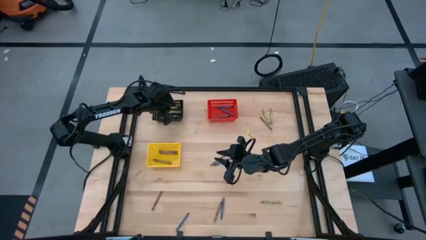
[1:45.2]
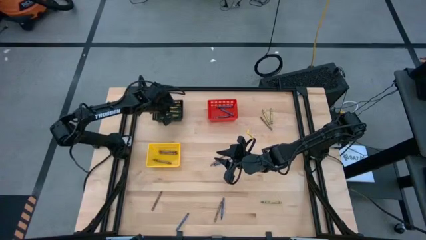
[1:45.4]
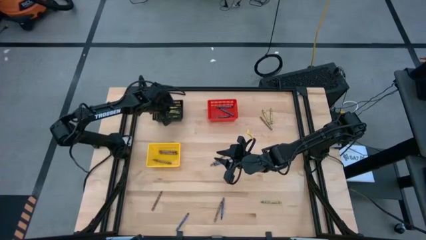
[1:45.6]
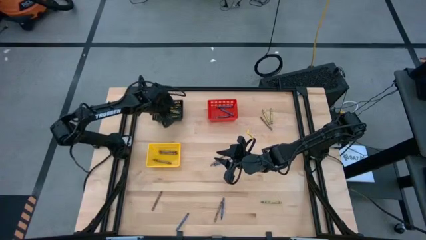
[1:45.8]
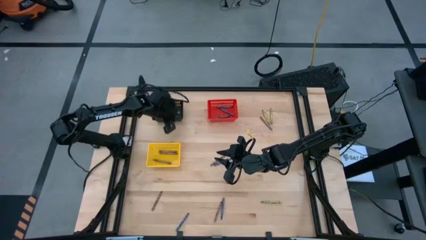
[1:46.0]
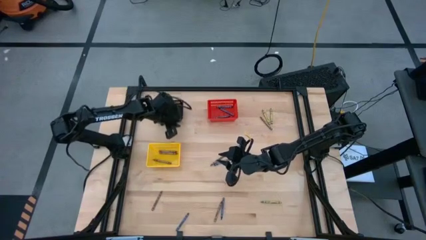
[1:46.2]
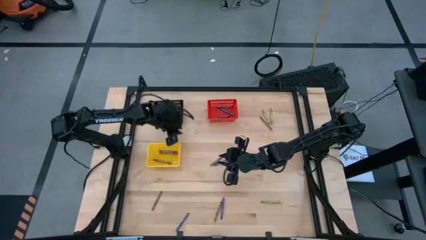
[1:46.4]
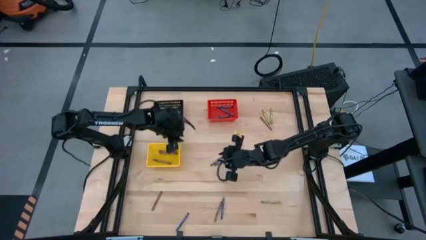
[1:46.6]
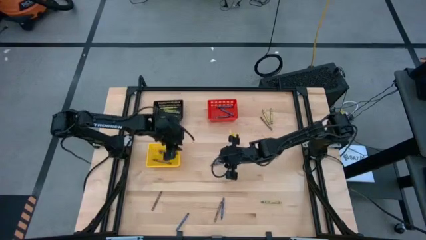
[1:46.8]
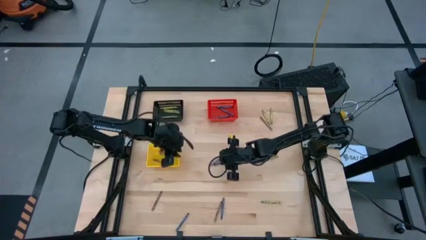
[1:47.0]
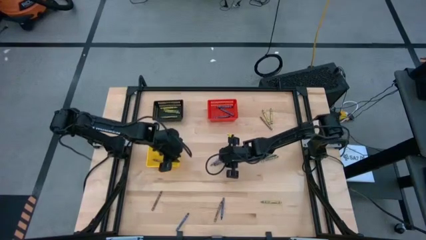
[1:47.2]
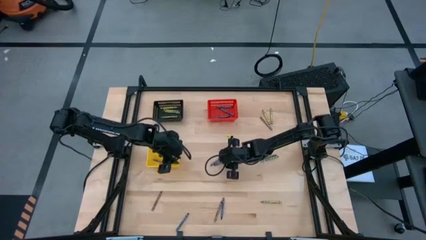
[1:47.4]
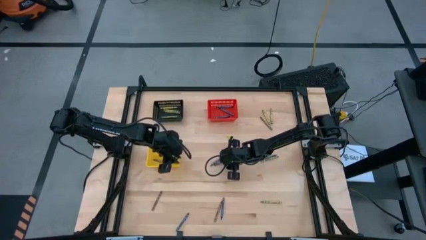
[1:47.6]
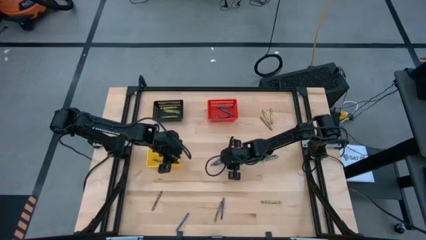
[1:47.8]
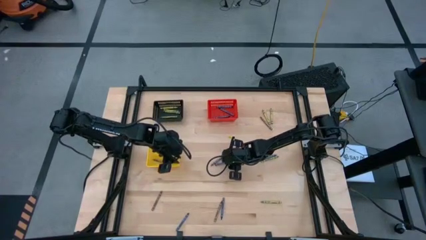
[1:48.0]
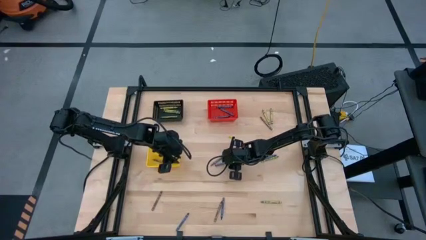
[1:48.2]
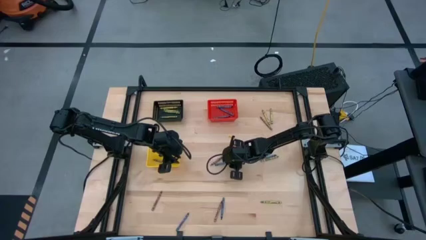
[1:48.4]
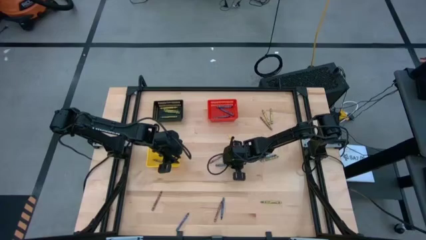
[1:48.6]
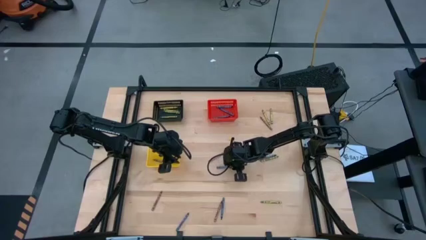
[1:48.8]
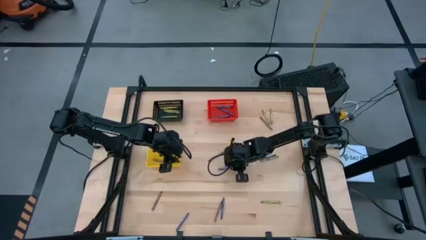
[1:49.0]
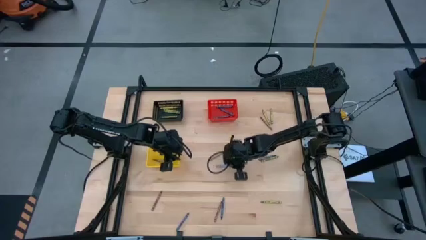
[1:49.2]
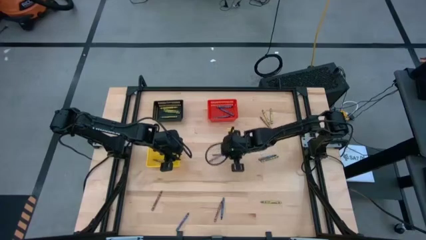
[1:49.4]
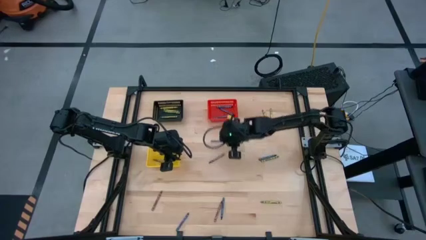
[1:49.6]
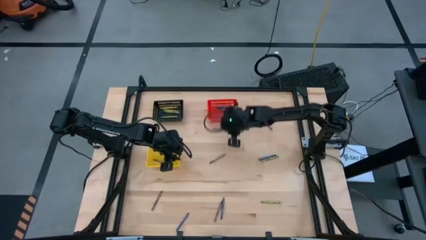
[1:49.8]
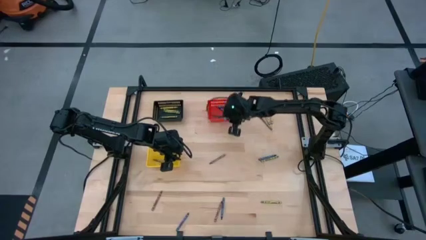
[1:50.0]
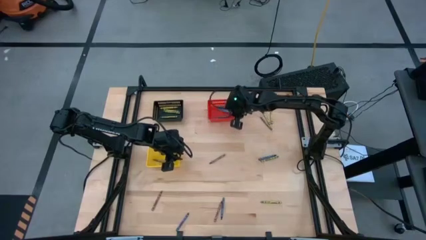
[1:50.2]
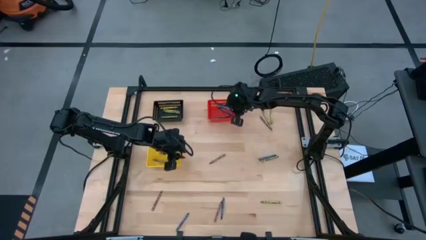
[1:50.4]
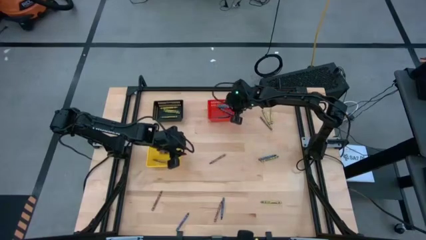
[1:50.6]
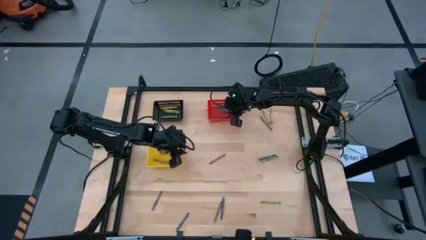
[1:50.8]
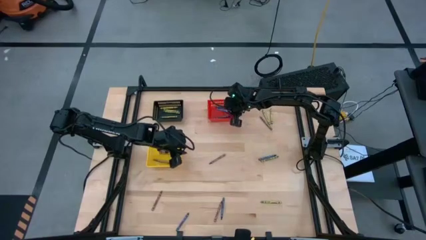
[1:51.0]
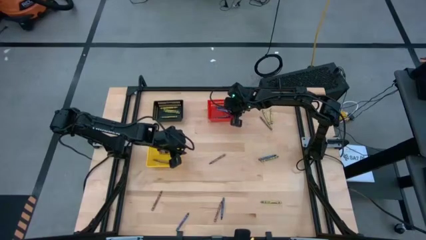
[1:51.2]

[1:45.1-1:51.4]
Task: Sort crayons
Put the blue crayon into the red basket

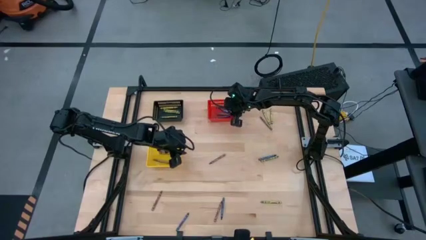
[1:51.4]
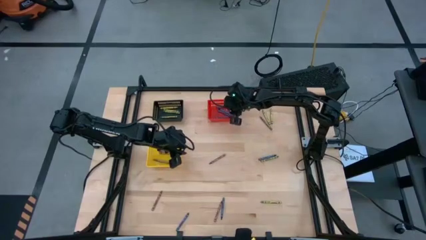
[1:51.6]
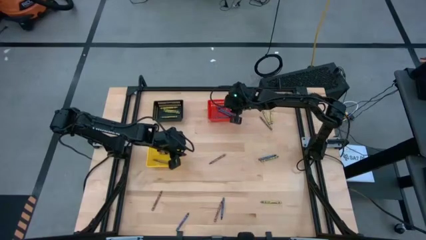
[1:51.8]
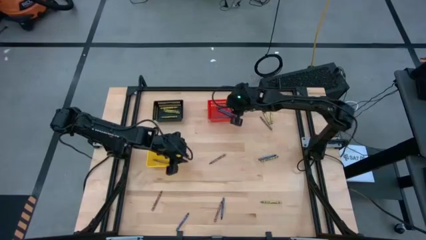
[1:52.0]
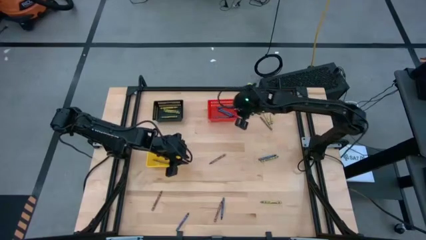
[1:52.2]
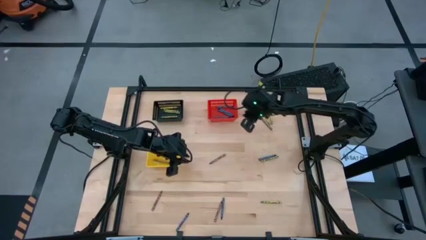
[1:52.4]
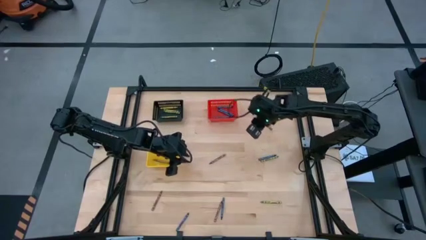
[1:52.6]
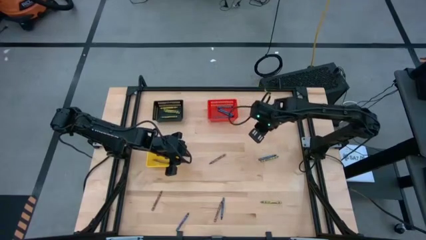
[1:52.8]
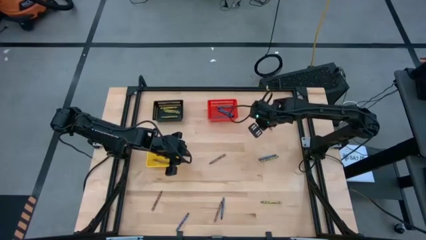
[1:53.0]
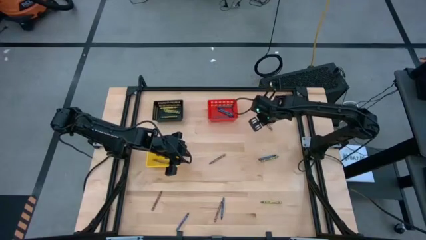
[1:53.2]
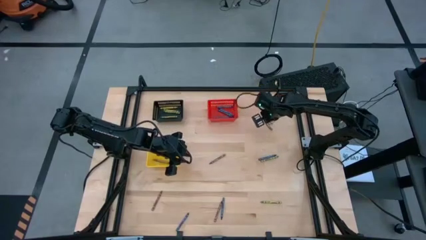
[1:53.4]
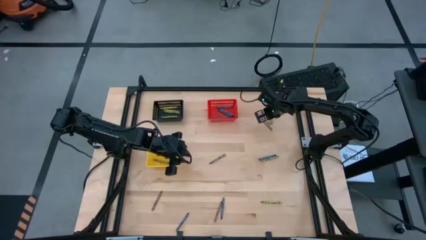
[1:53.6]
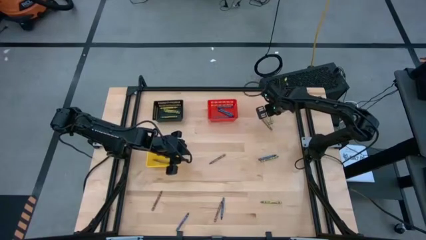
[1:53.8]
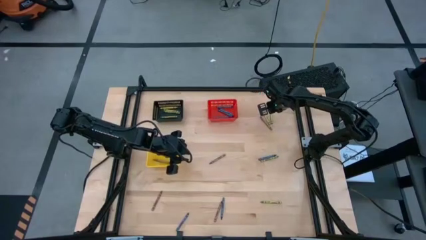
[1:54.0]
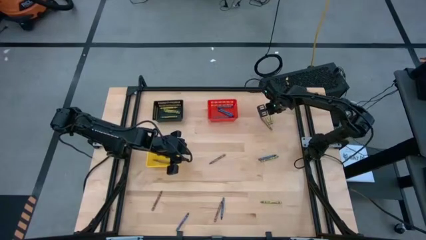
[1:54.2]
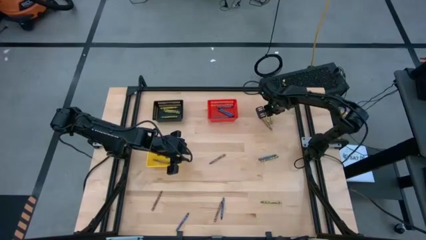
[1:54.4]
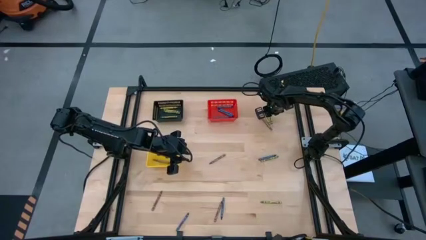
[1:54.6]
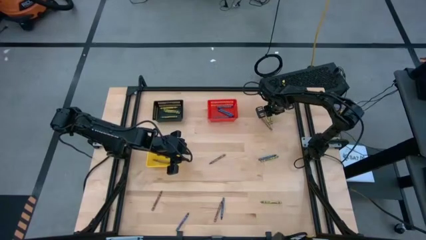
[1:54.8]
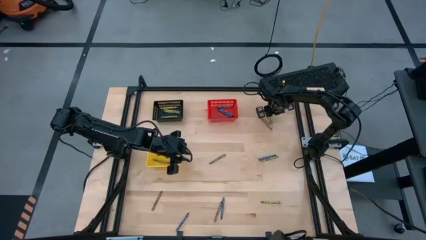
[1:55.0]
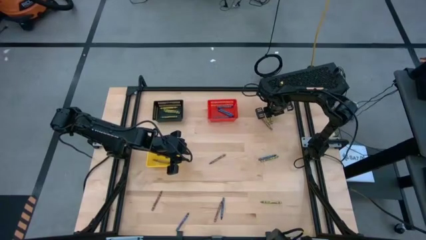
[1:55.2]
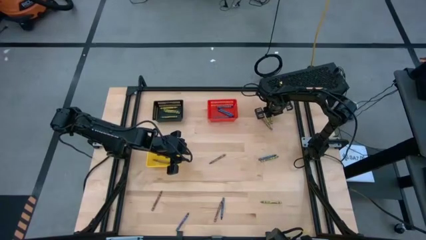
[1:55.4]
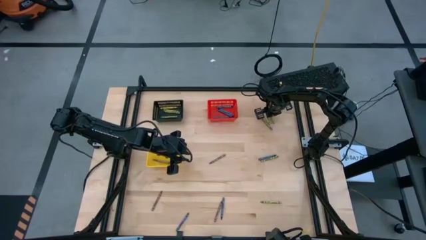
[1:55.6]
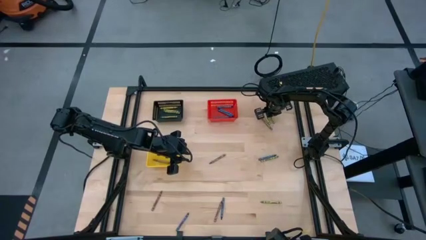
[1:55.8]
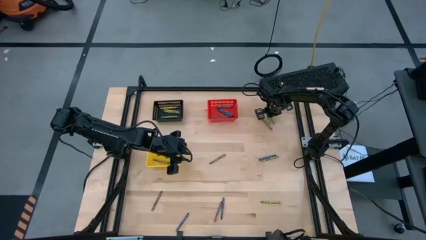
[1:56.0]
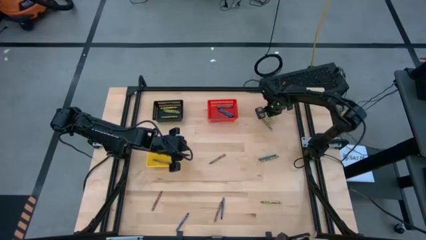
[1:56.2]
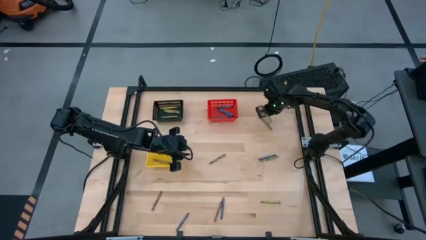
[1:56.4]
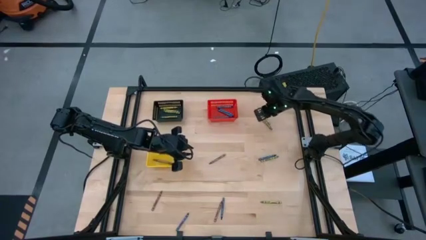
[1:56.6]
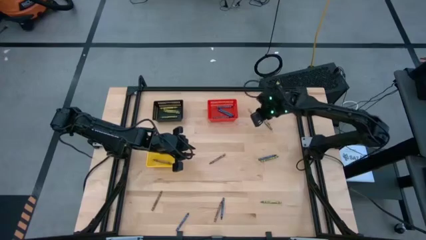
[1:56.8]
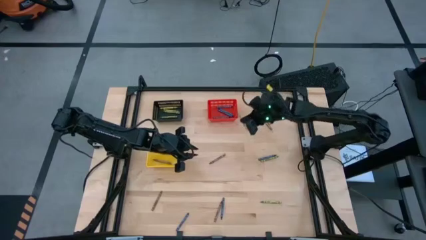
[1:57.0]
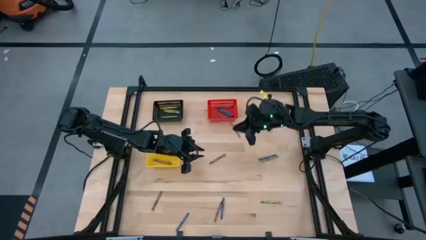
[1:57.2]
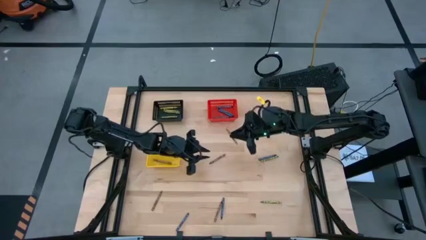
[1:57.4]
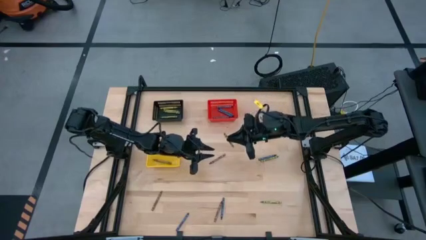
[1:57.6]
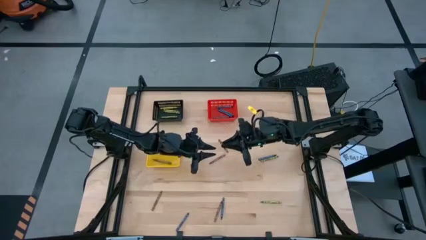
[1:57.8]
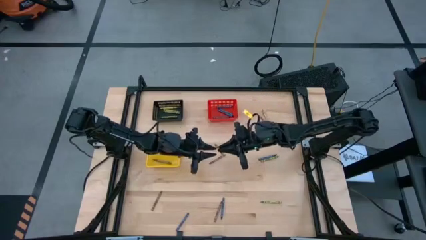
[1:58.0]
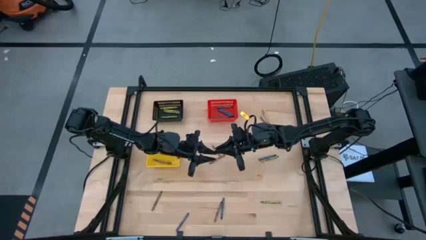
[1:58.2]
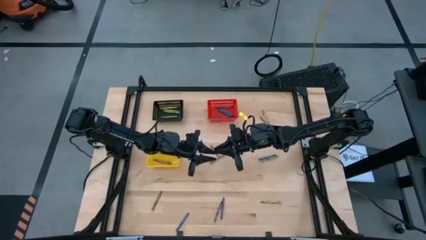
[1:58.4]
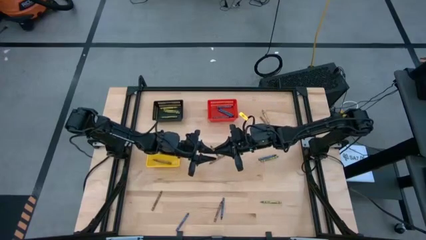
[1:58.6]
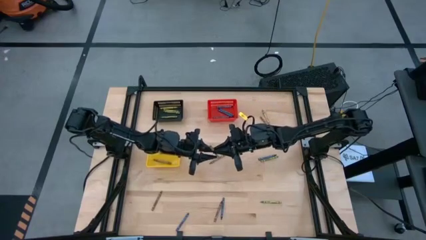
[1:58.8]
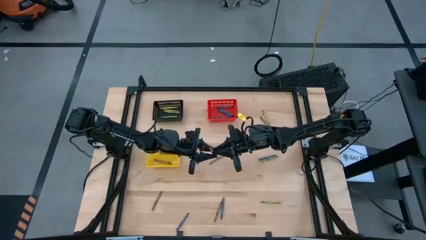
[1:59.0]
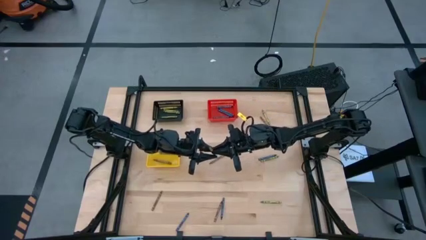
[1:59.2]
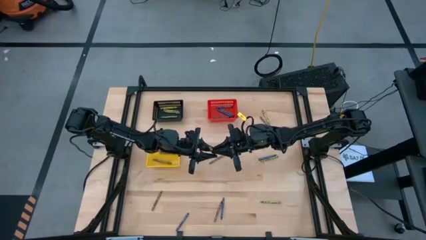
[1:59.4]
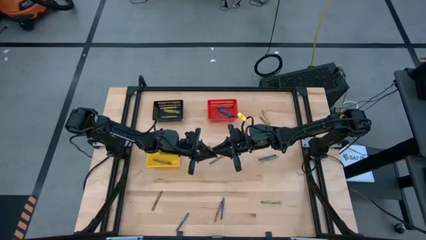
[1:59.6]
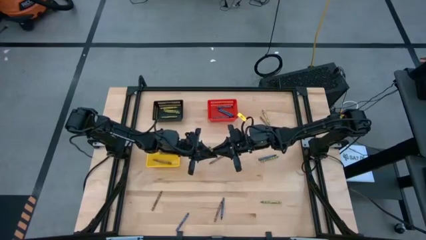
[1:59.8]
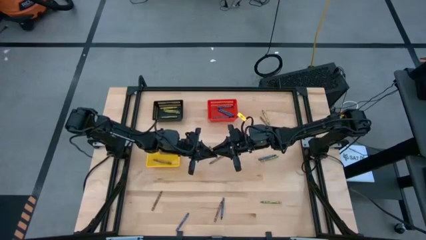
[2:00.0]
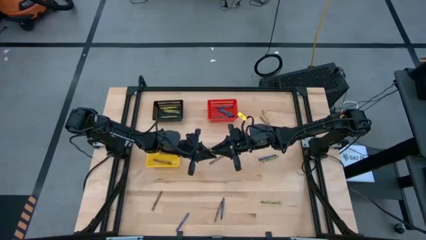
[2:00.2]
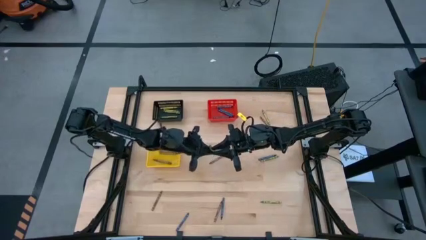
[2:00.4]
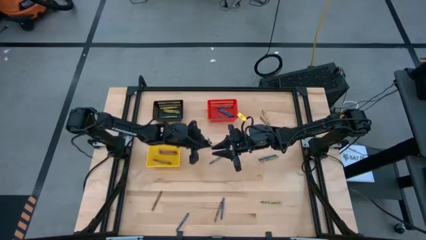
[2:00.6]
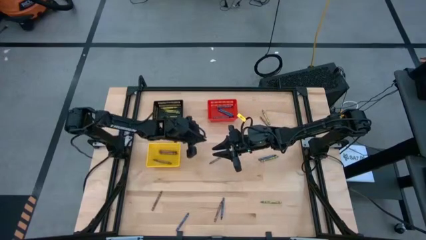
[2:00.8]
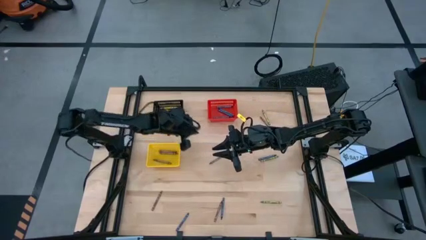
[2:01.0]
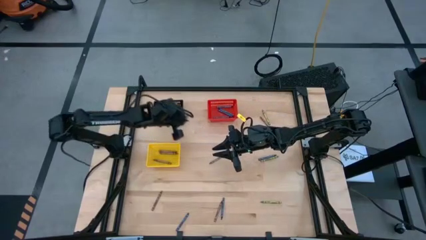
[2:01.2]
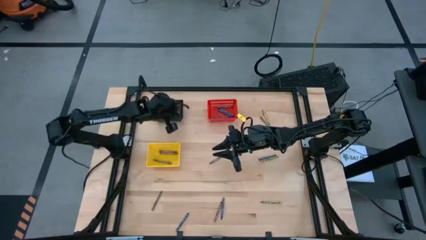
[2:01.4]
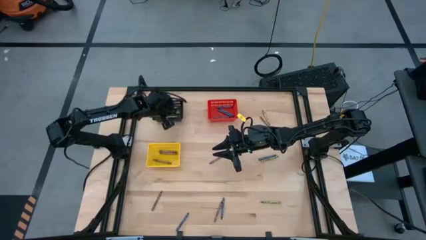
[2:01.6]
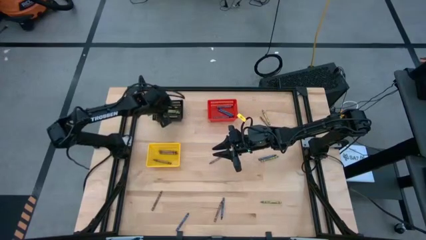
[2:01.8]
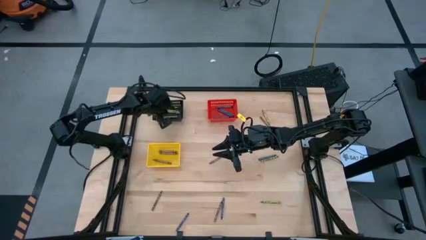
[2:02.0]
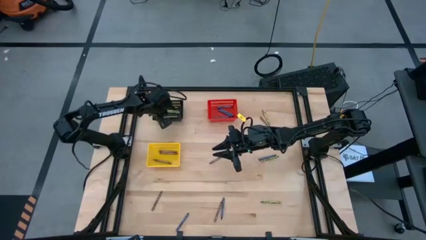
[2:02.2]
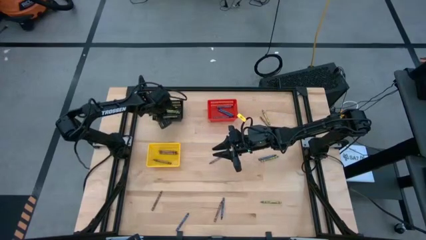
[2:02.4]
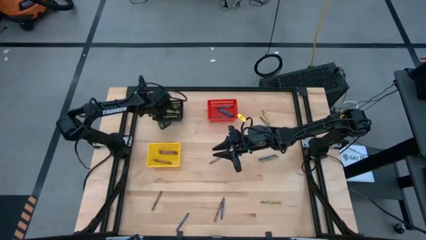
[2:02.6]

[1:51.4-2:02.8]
Put the green crayon into the black basket
